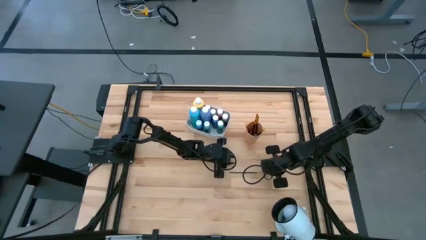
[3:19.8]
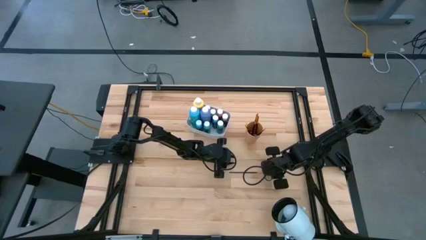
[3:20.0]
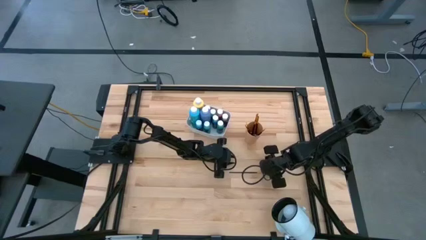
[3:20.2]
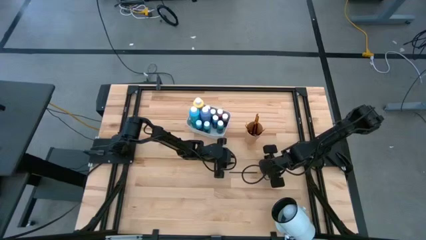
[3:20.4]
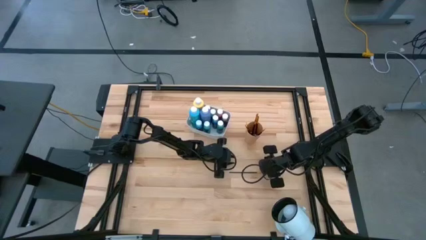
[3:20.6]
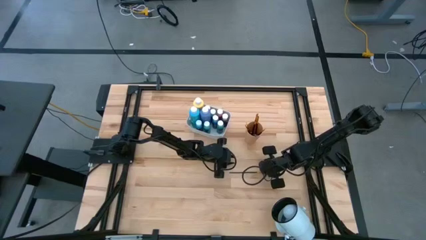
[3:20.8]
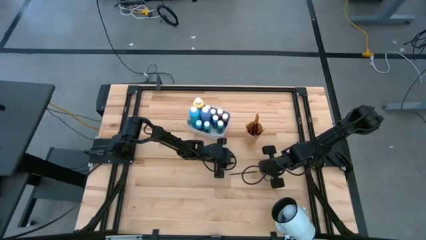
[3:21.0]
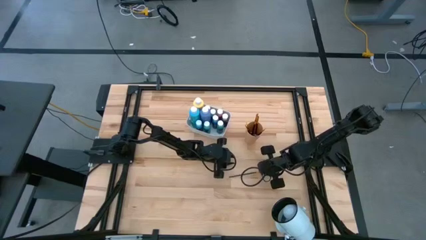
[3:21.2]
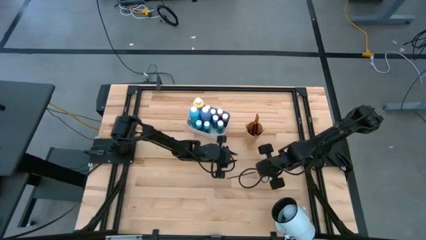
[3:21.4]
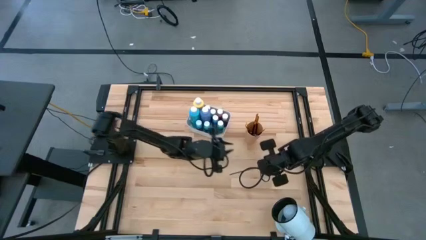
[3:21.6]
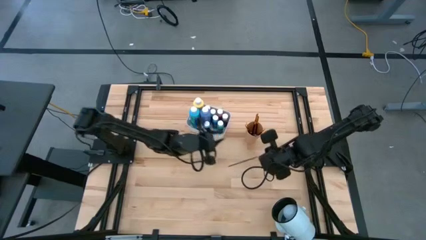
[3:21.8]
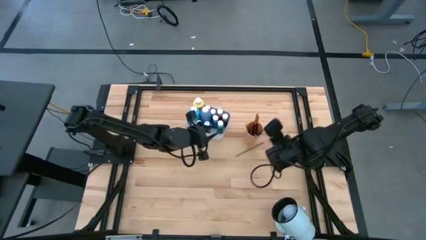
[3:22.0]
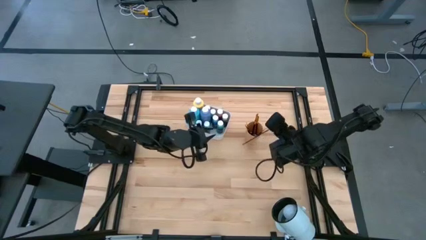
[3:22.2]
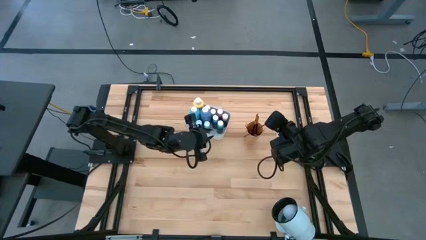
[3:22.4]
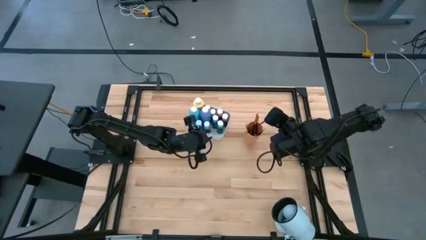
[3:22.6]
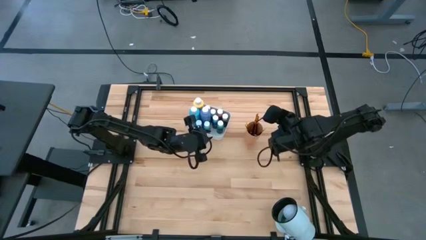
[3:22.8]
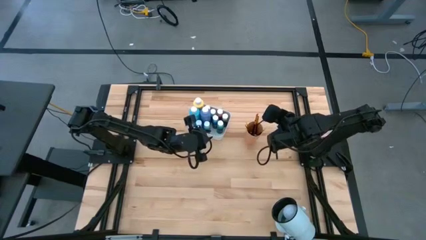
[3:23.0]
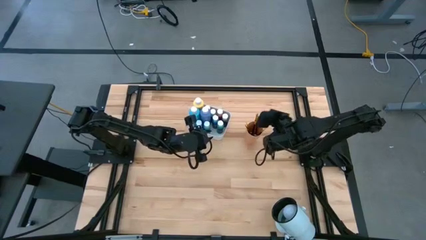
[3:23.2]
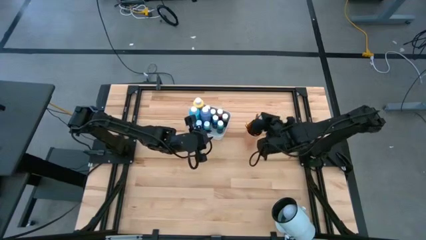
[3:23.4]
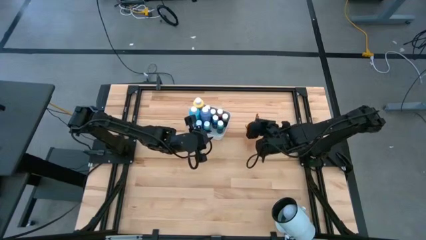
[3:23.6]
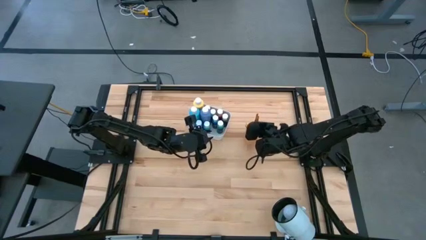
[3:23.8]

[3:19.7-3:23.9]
Task: Pick & Place Paint Supplies
Put the gold paintbrush into the cup

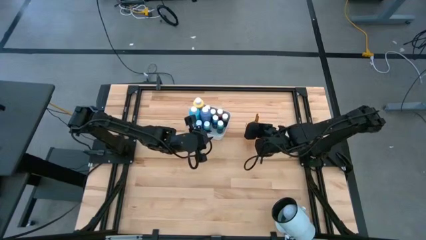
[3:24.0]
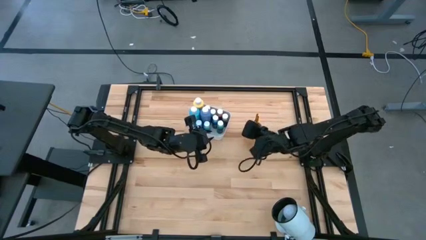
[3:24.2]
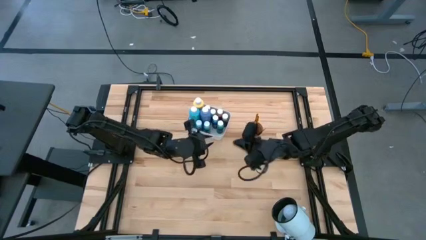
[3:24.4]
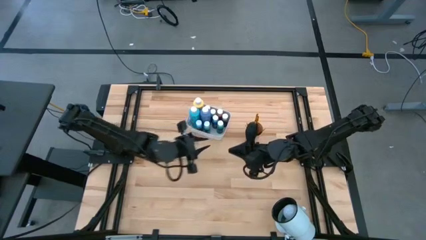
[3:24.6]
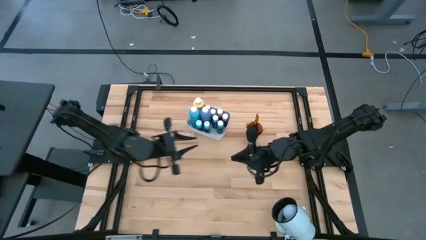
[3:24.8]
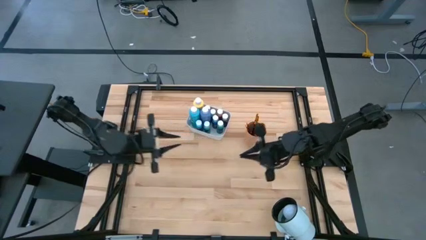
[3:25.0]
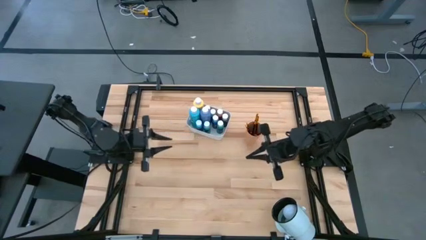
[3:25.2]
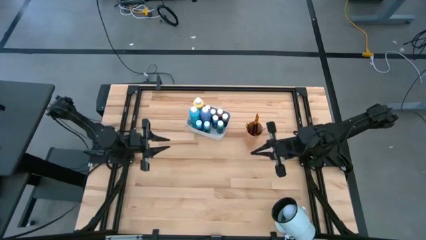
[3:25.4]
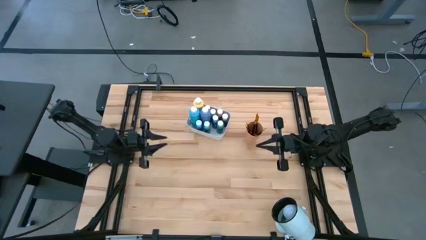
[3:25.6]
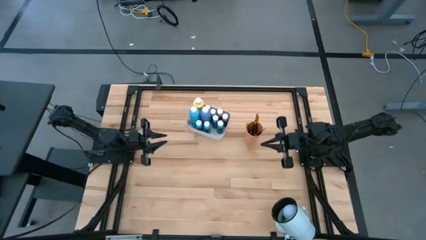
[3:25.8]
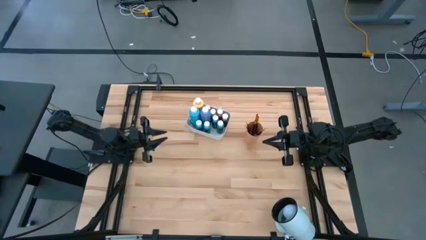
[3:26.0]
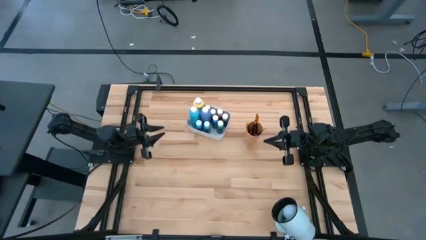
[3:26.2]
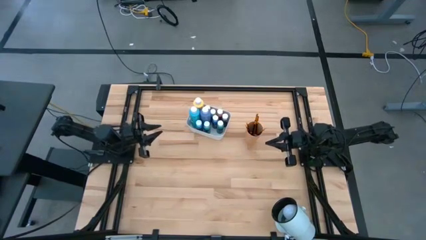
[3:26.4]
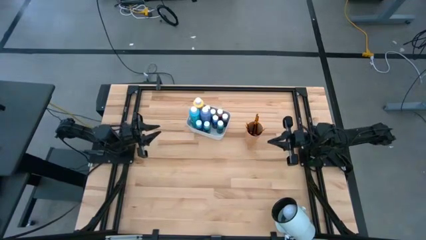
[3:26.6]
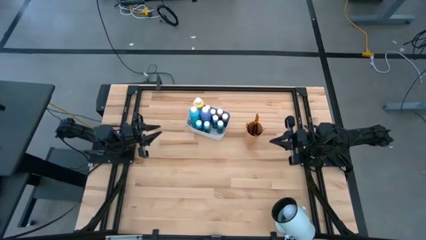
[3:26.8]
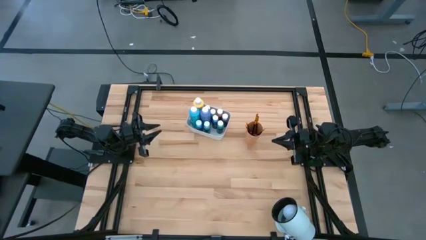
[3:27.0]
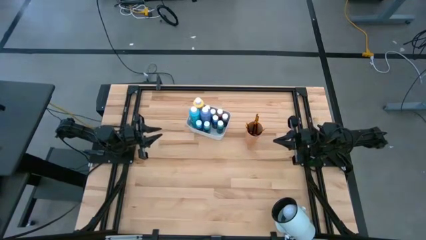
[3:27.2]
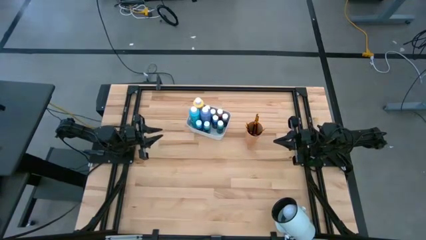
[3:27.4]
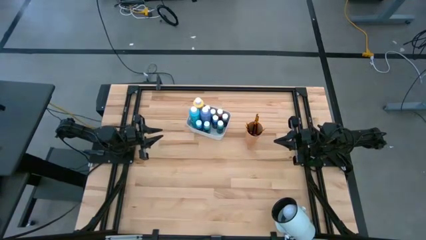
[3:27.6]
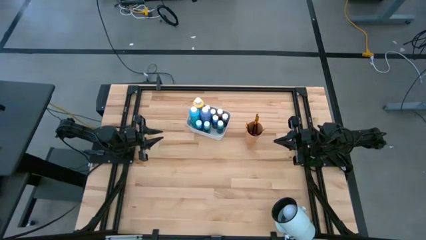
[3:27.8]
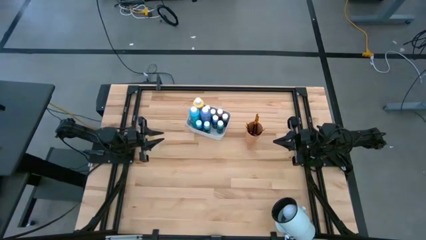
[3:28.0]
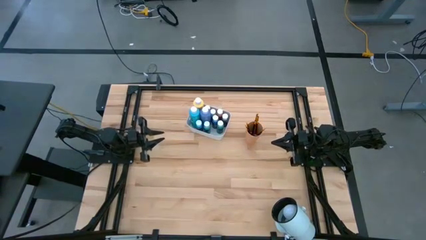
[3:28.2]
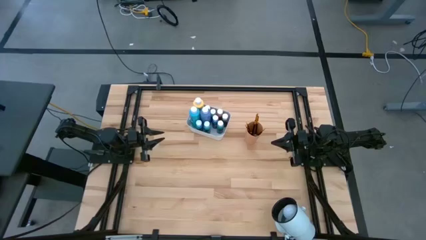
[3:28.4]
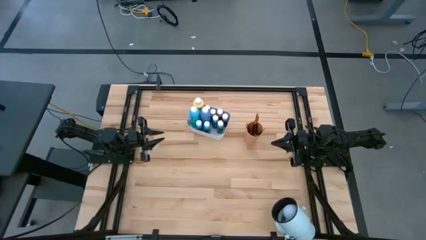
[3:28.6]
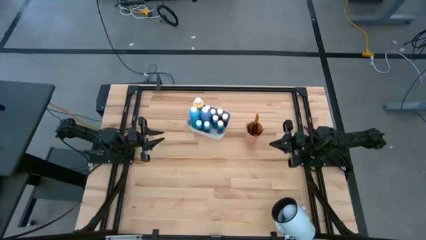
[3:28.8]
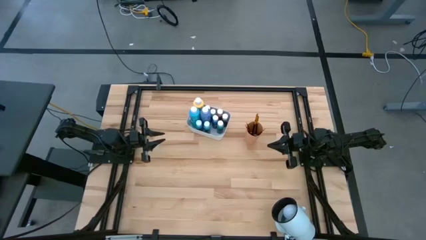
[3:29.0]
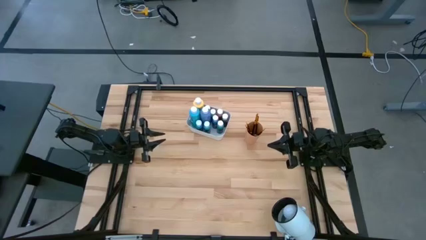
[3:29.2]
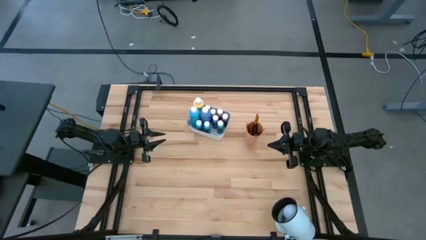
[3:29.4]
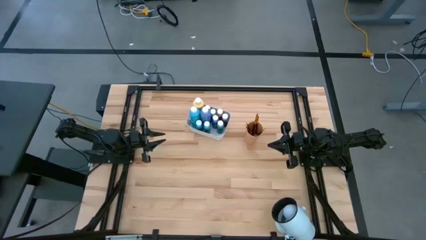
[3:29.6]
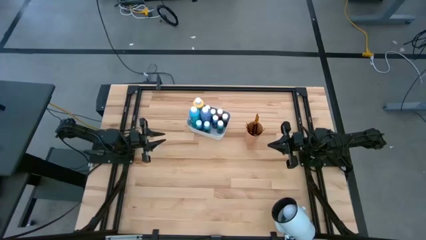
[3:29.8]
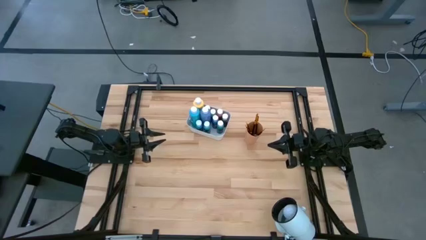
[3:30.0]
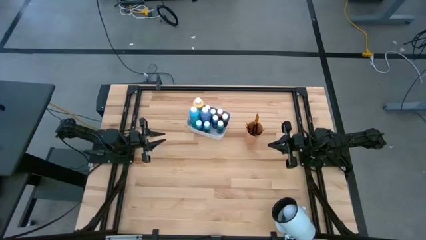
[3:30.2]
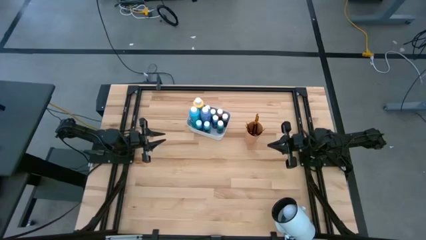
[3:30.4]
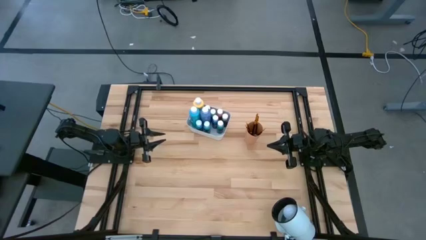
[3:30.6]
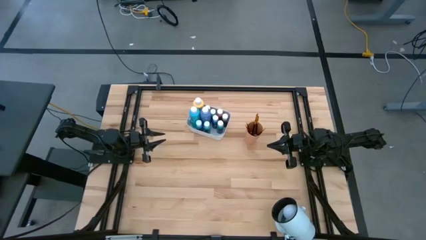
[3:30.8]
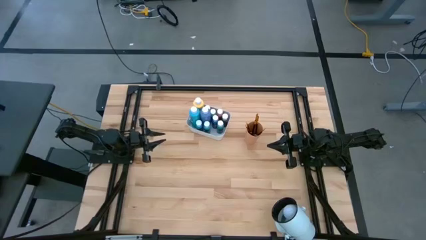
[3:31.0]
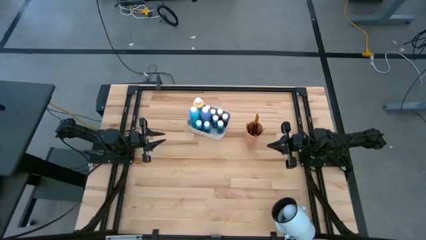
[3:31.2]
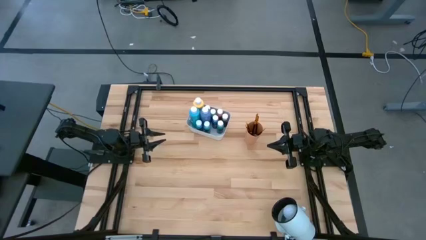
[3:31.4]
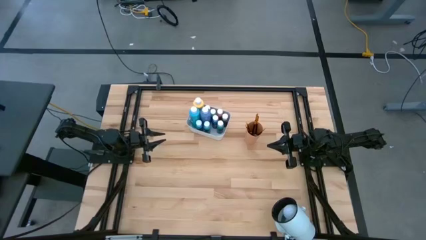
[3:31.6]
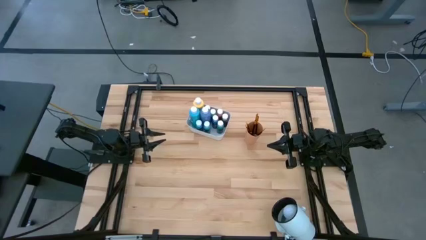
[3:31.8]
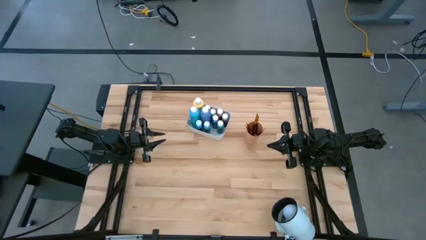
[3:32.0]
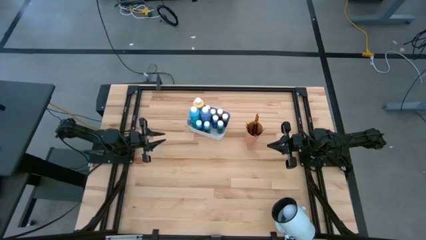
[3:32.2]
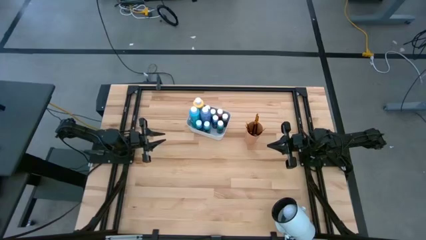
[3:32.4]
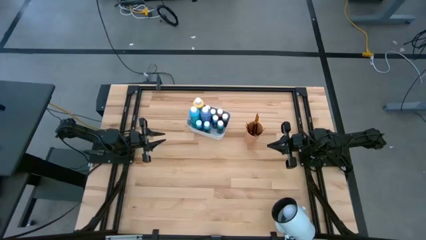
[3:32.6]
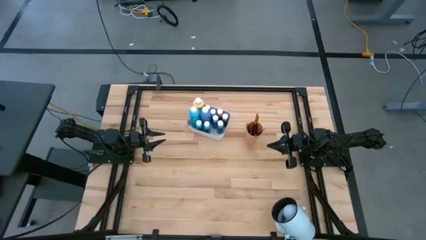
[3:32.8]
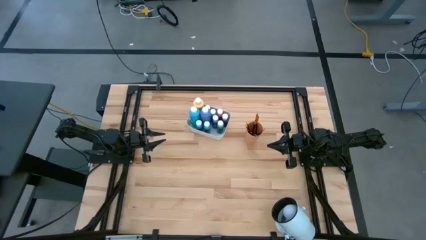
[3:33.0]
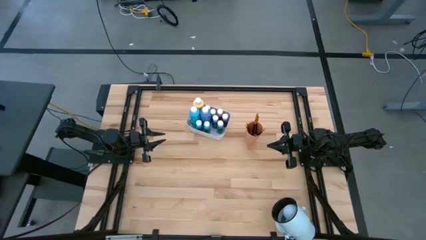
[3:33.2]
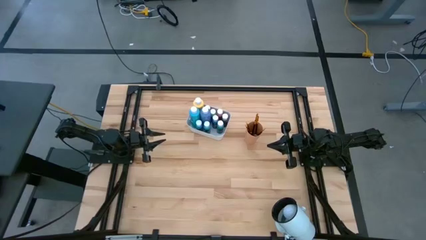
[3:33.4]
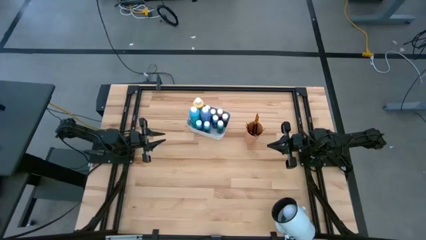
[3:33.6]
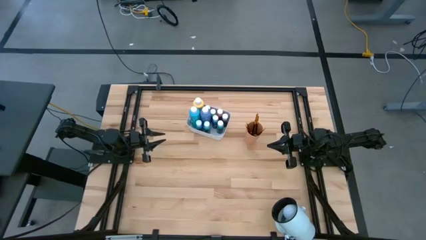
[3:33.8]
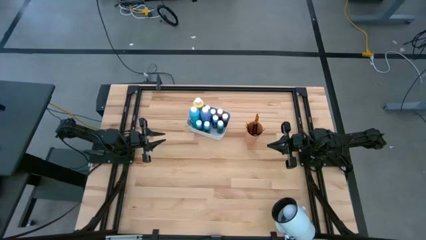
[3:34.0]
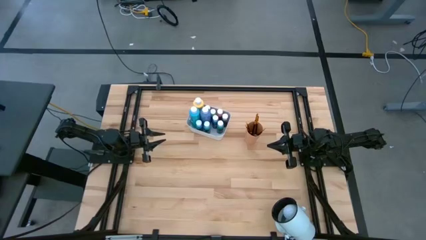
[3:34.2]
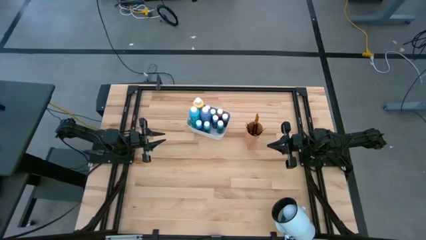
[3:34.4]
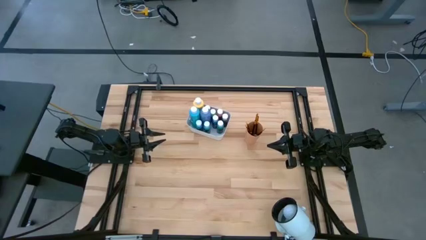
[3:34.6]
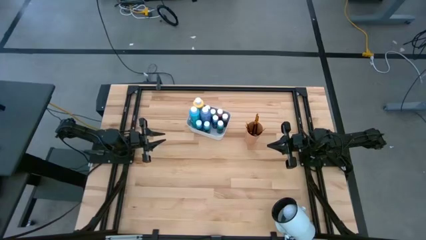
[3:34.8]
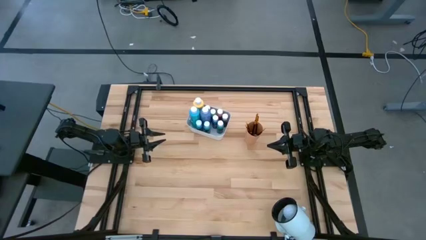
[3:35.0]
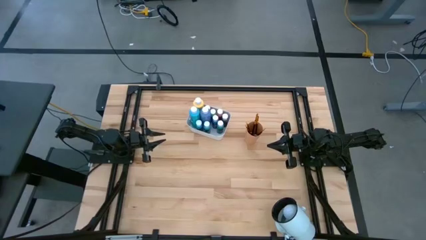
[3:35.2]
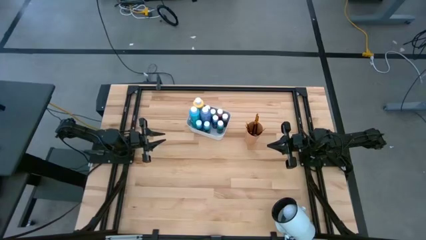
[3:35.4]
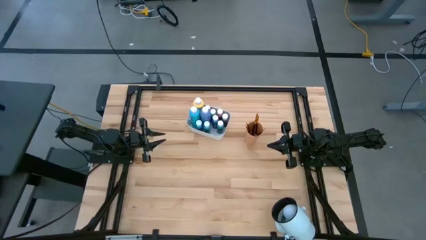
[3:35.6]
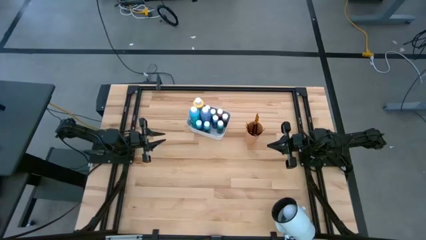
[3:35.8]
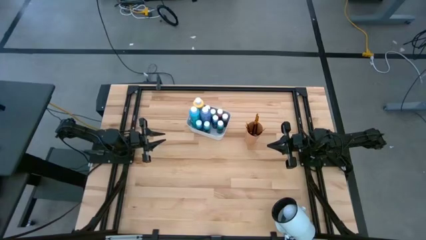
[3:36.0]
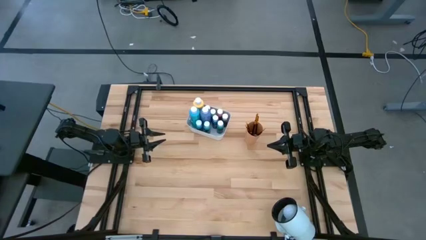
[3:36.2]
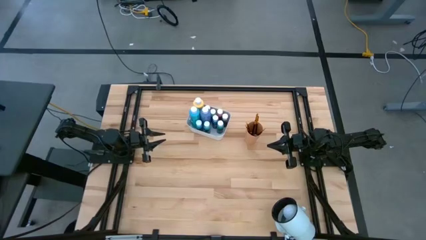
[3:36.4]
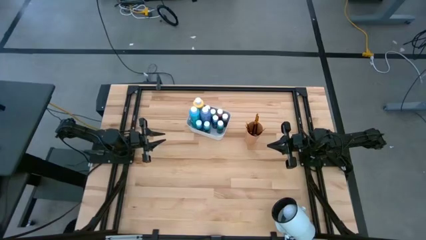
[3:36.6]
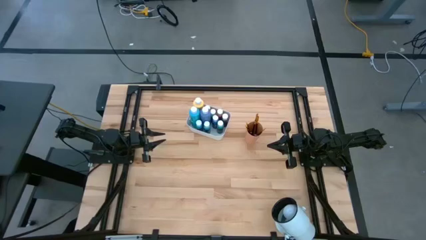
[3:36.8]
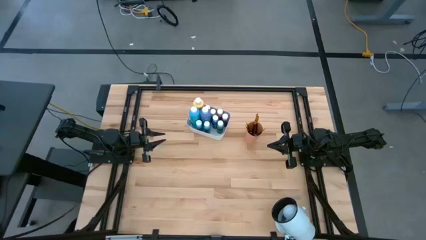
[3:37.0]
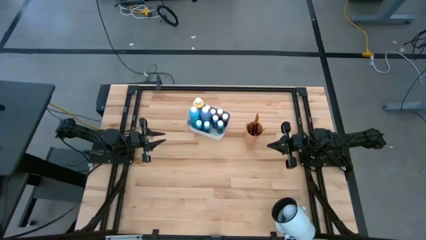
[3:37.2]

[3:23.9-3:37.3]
Return to Home Position
